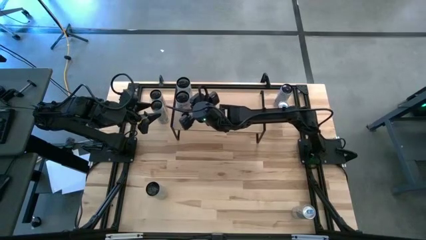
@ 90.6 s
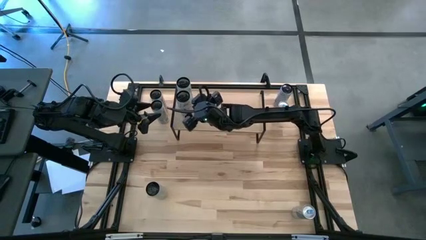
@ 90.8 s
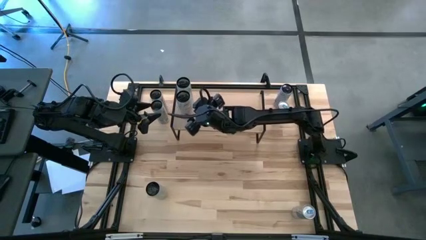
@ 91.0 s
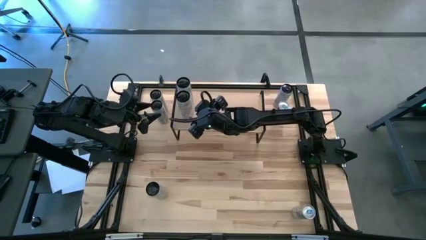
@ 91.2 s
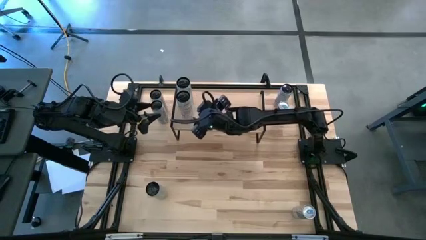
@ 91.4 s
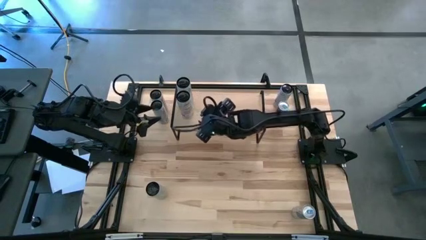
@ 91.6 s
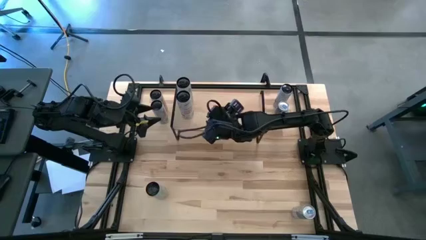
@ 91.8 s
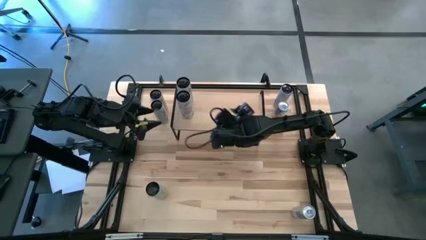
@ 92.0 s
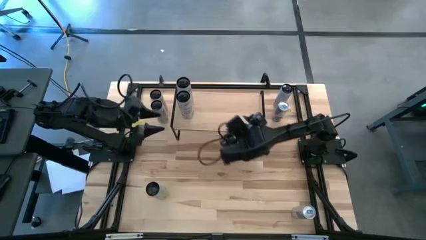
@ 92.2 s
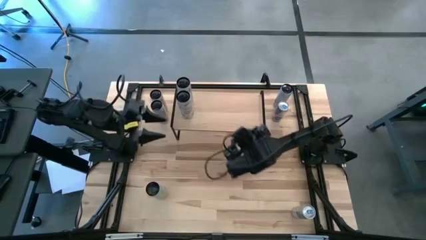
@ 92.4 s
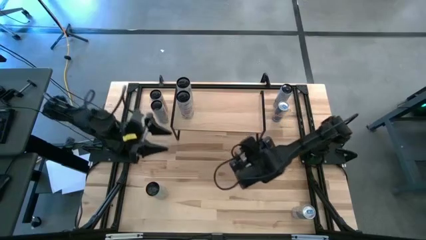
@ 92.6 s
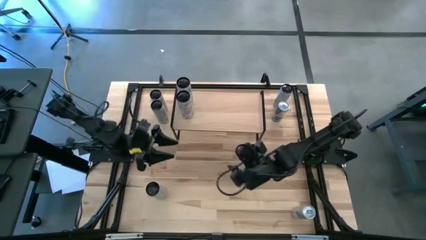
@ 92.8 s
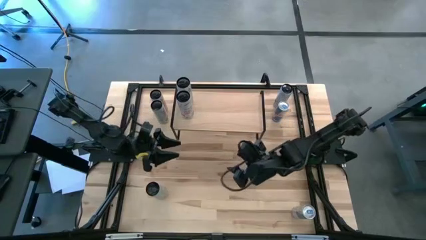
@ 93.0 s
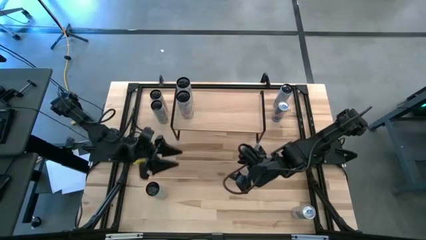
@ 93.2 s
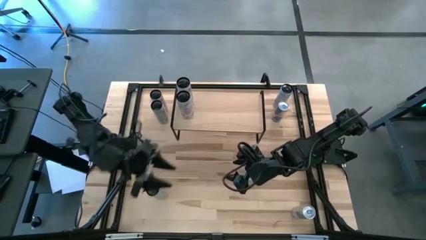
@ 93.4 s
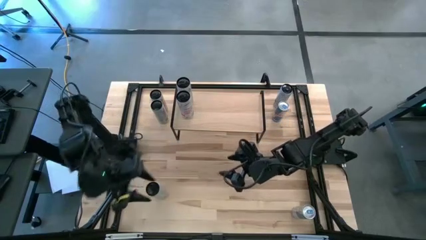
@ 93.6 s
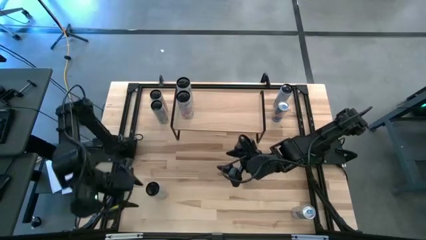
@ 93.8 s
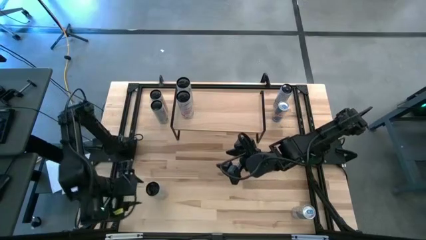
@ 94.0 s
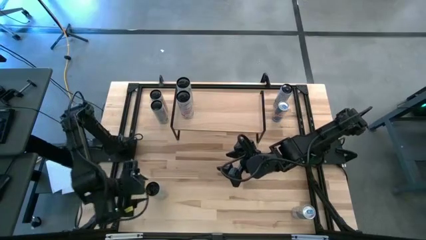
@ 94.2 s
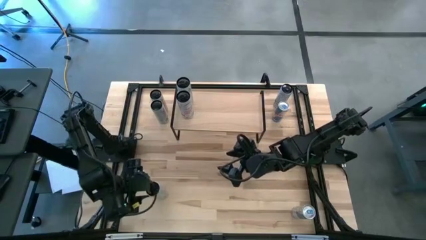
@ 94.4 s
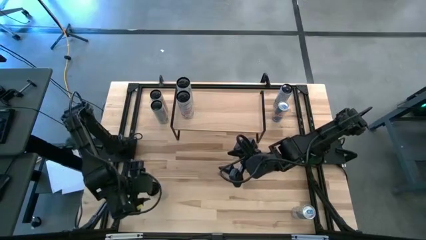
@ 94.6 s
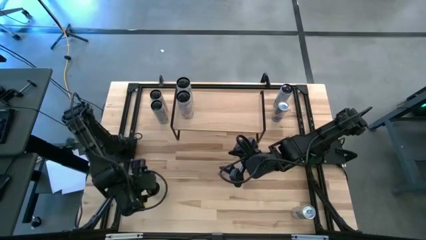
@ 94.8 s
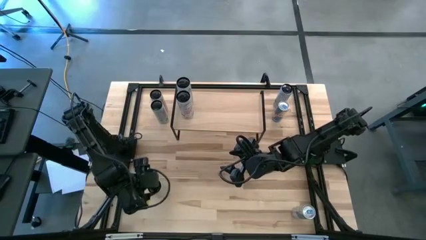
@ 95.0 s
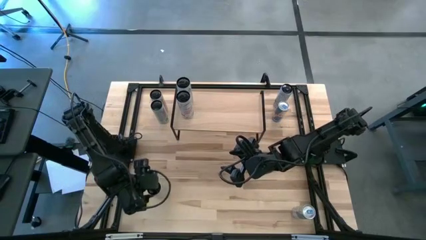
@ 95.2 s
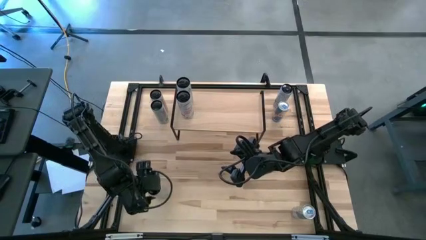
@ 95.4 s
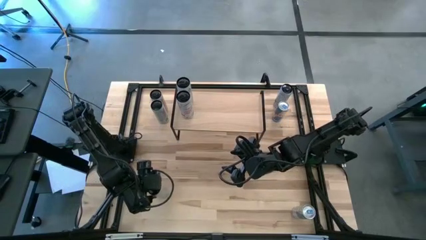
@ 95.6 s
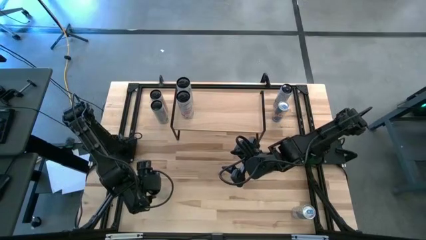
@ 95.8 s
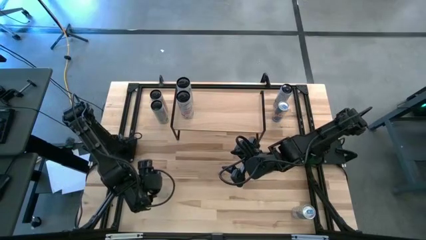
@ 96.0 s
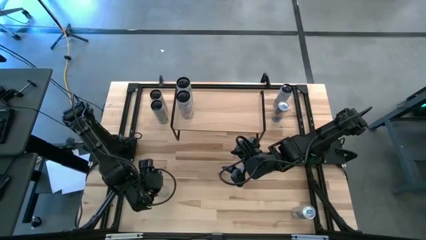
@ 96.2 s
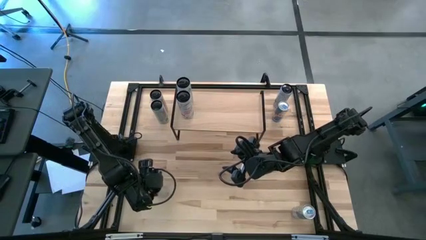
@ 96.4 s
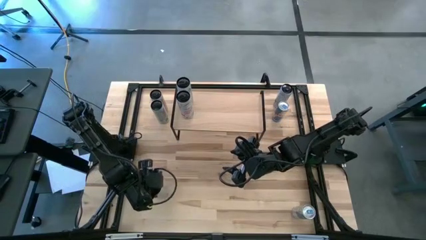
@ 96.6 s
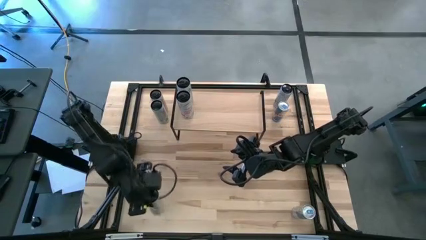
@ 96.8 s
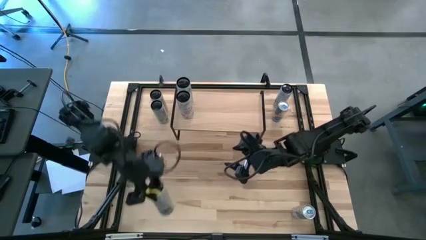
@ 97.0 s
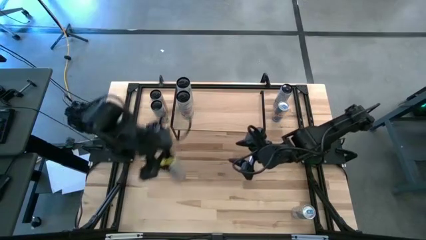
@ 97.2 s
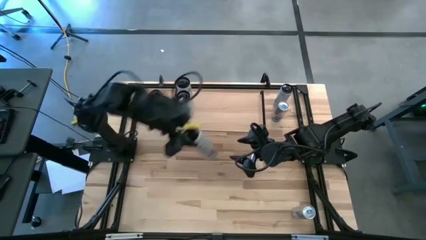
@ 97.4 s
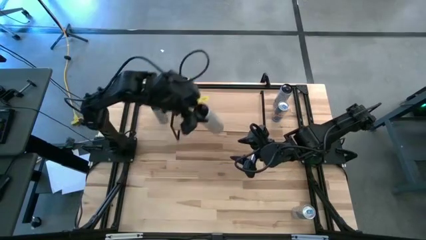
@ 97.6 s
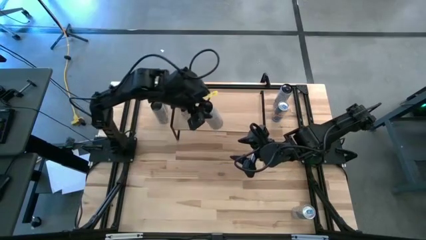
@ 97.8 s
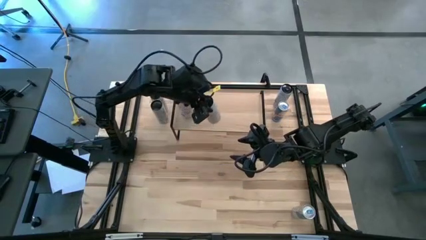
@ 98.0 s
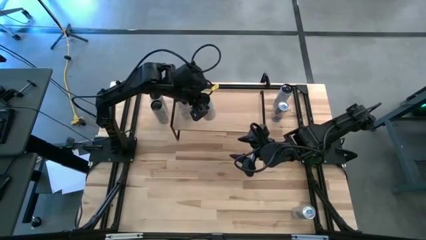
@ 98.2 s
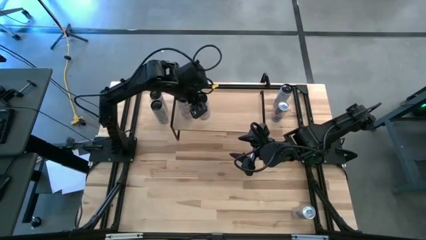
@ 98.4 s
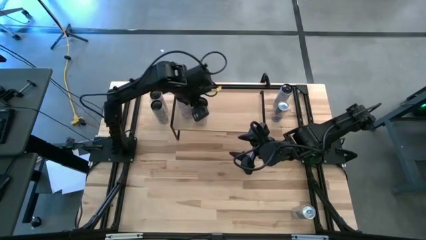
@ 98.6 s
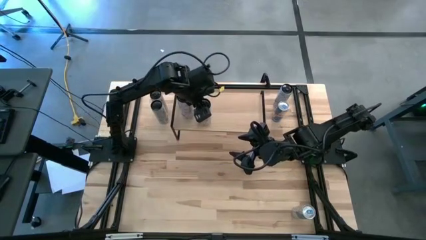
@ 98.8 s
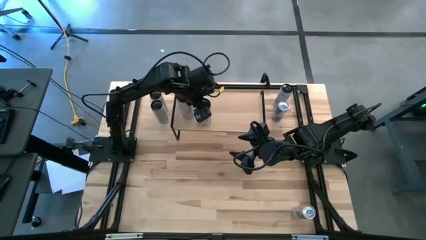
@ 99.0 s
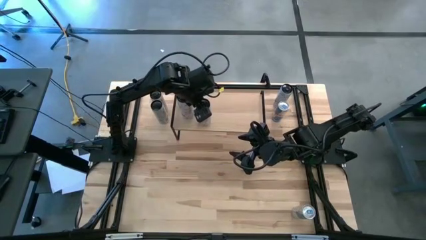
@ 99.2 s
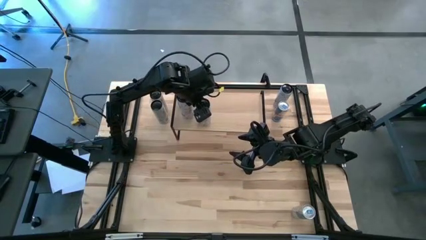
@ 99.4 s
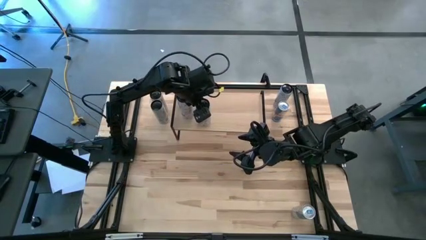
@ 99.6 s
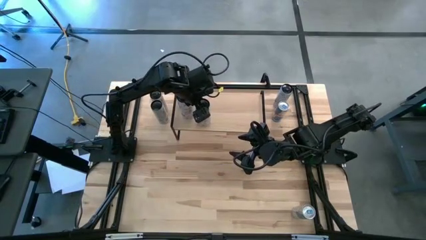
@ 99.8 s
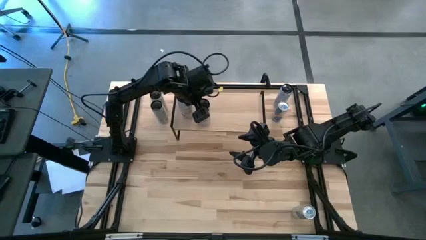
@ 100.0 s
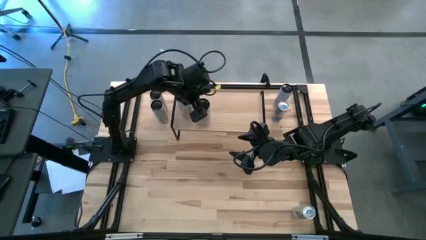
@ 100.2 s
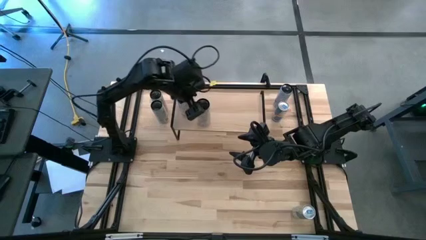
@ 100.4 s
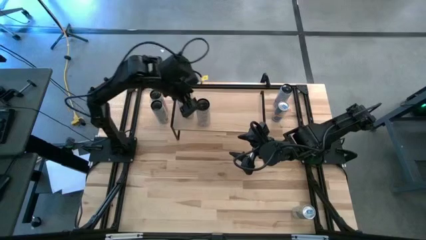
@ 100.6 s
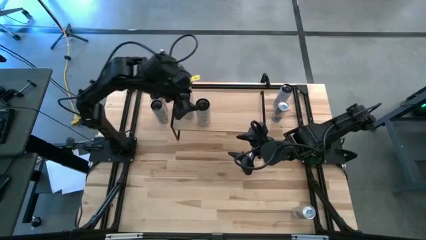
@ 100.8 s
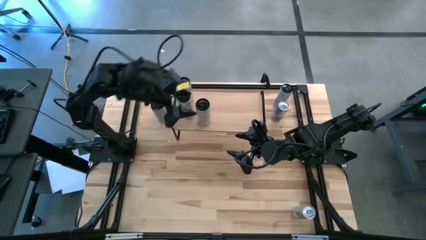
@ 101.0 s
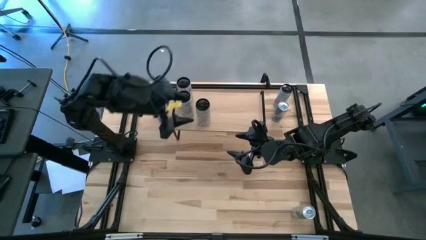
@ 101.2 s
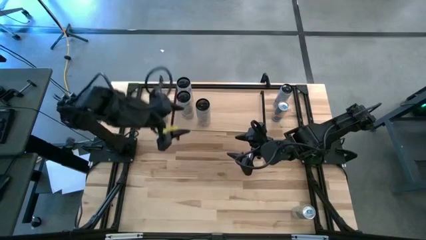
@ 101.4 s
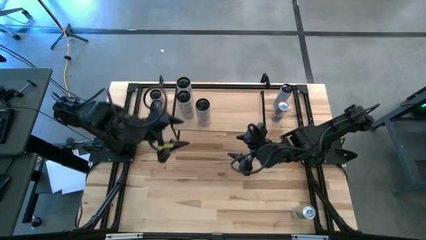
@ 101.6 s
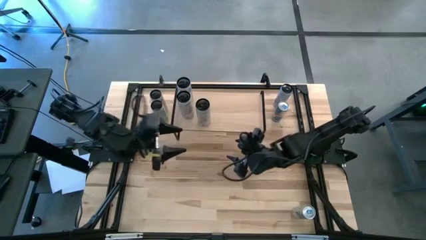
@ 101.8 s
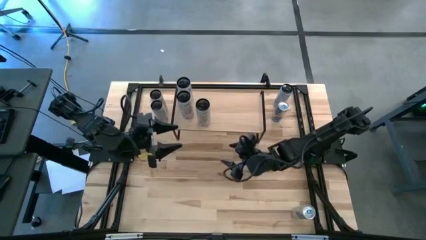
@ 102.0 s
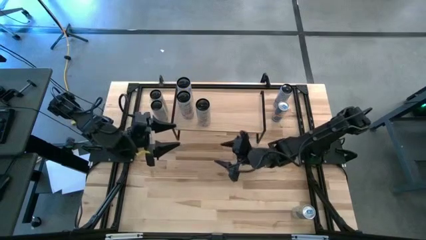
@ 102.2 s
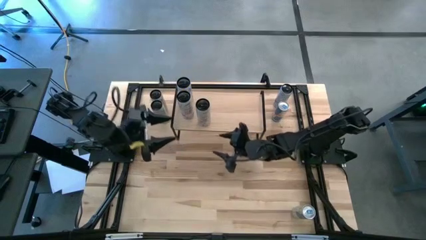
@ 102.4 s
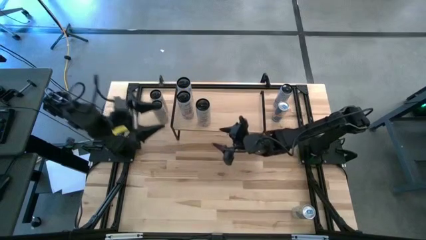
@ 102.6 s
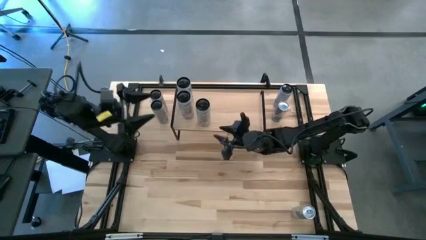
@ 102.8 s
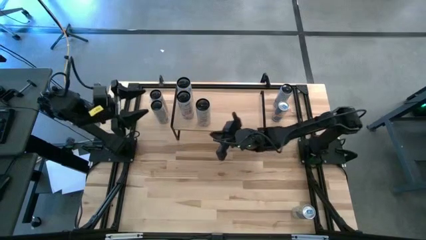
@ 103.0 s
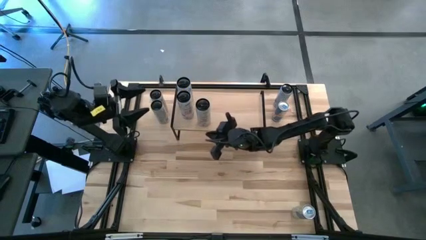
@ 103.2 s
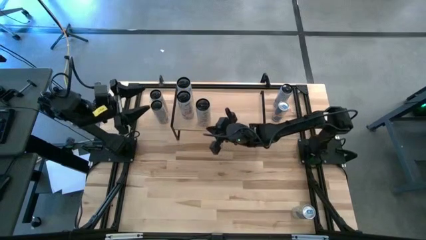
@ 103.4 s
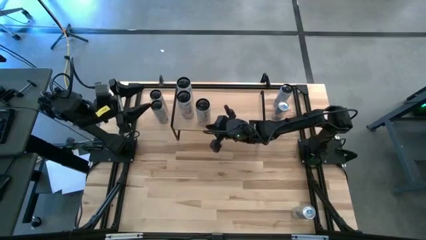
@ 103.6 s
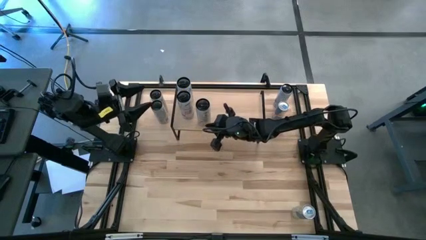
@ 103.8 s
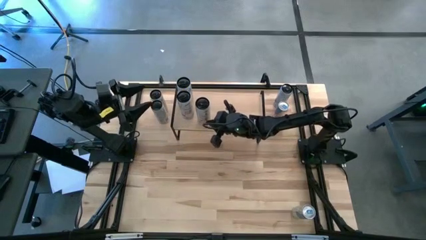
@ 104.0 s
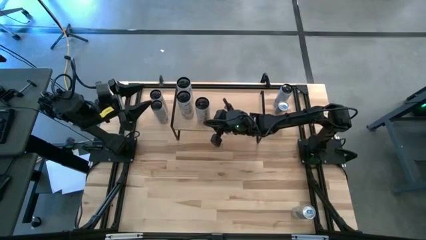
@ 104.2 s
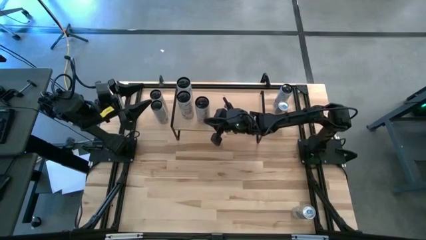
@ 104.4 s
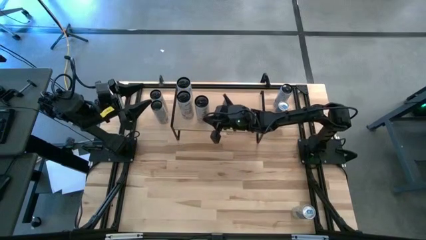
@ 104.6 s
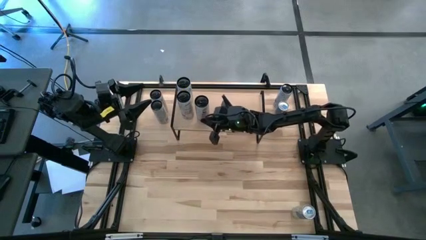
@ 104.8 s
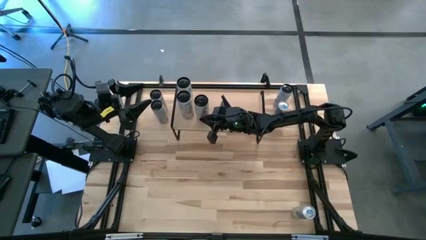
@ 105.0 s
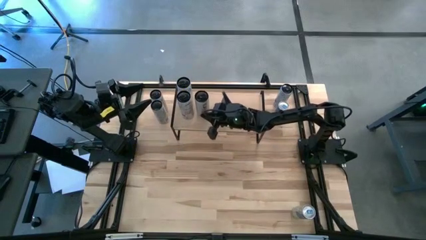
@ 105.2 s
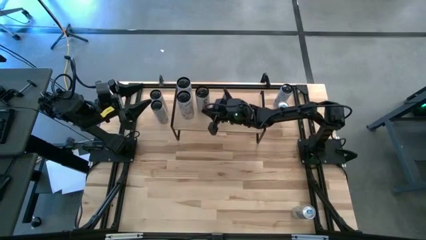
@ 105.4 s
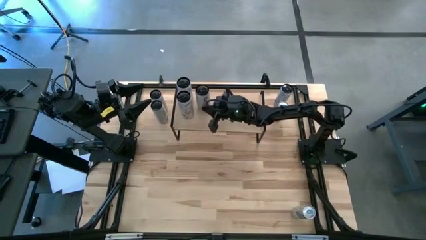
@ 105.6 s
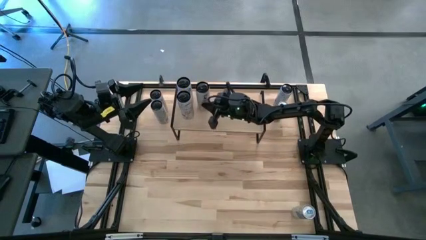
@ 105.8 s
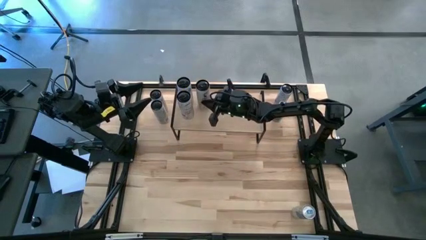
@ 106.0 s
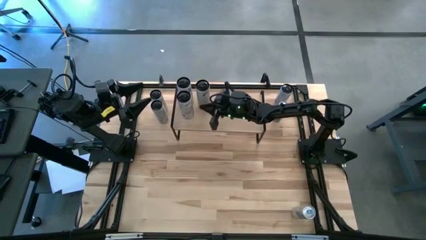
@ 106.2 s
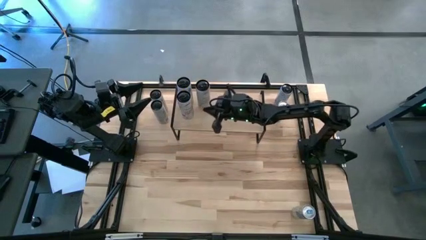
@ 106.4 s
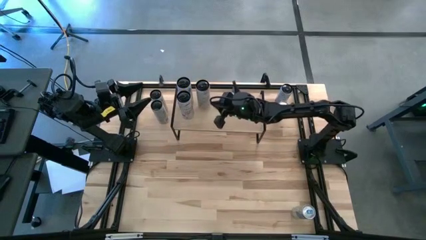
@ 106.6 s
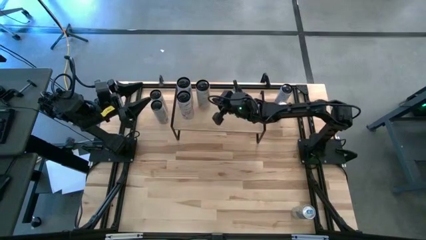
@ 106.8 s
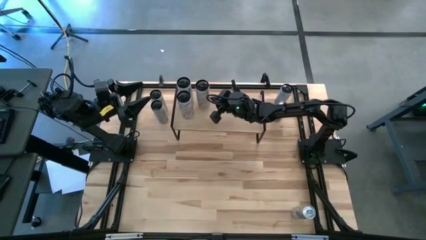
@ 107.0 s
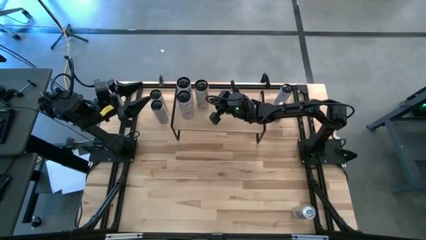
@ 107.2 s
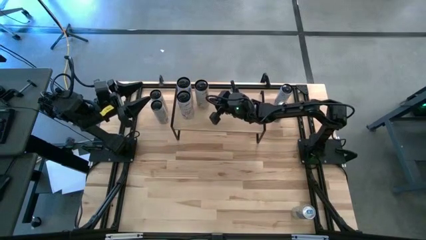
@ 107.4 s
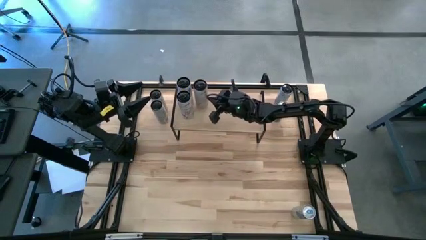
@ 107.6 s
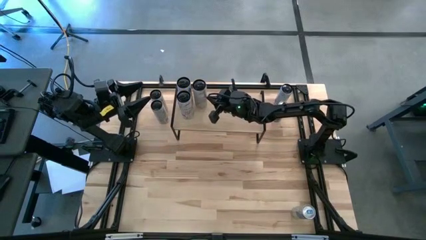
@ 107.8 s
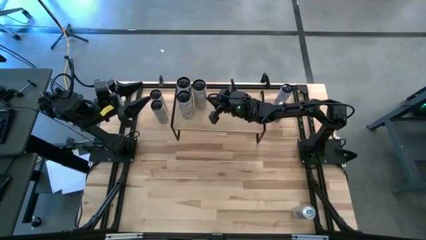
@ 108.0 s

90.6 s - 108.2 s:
Task: Place canned beverage on shelf
Put the bottom white yellow soda can on the shelf
